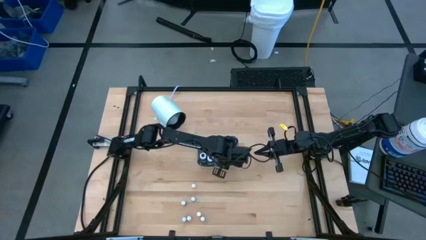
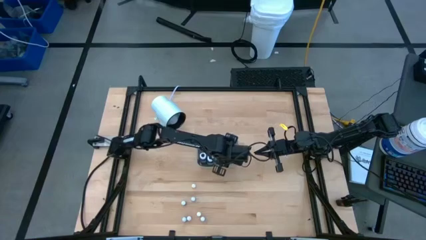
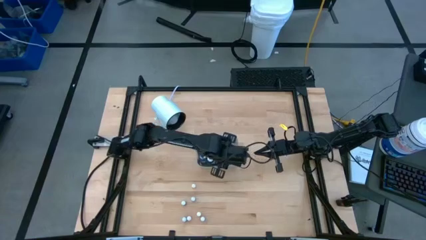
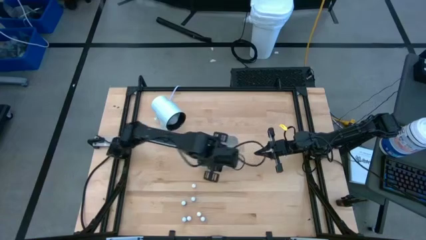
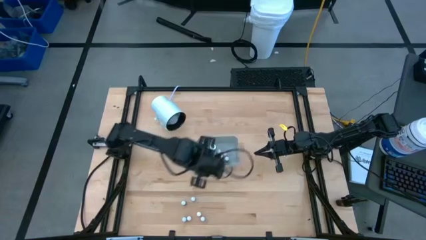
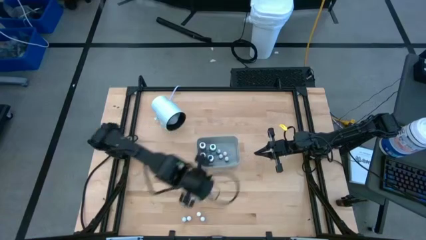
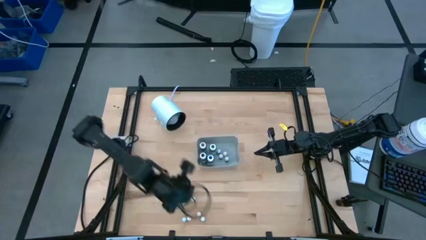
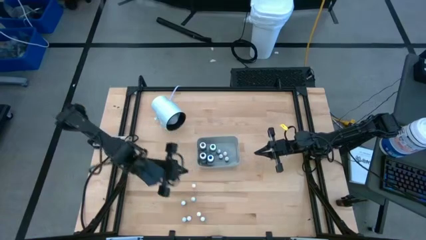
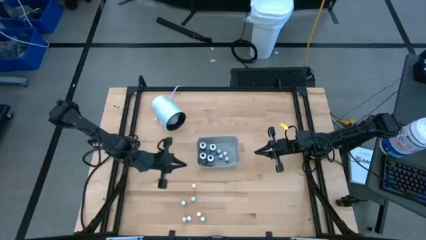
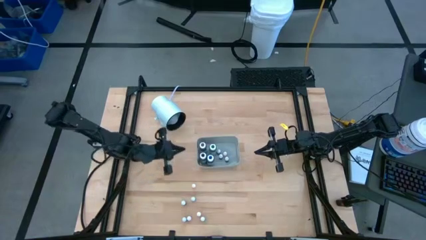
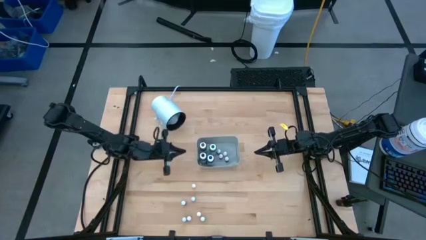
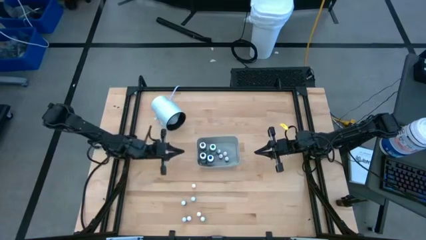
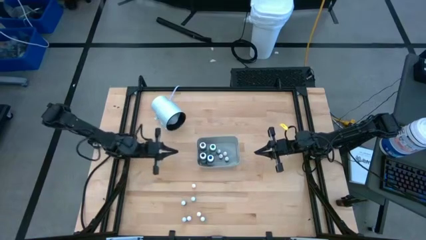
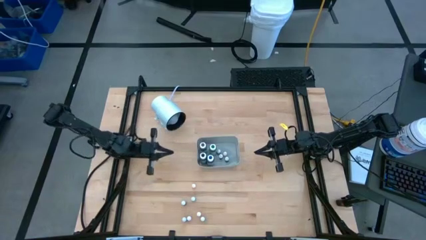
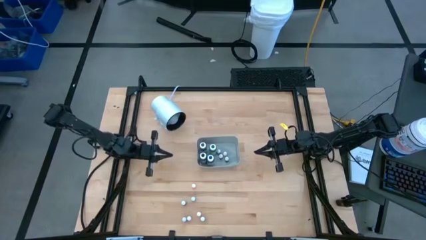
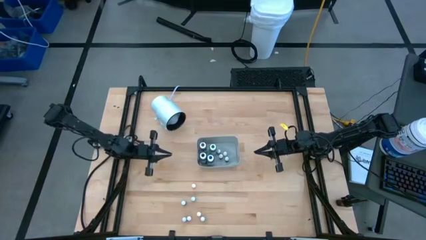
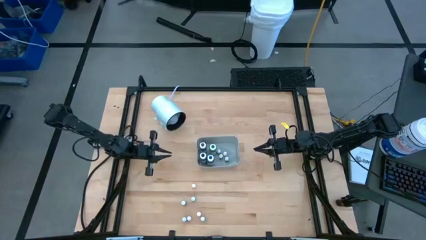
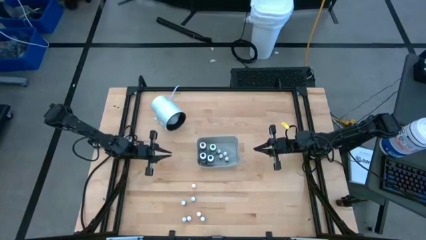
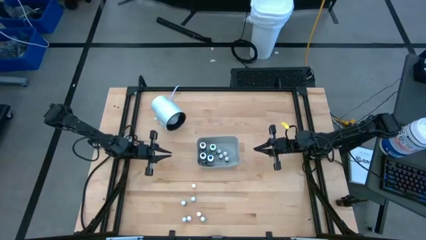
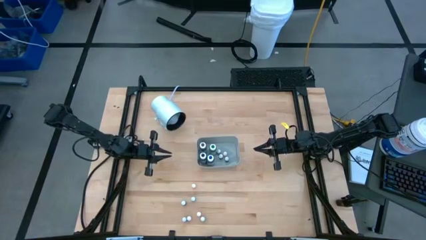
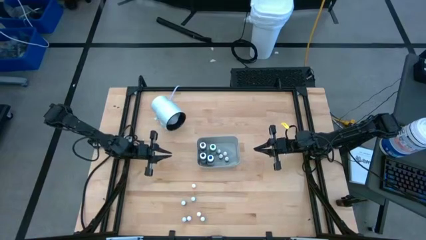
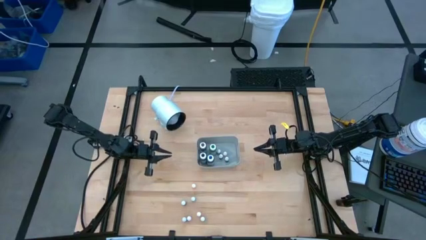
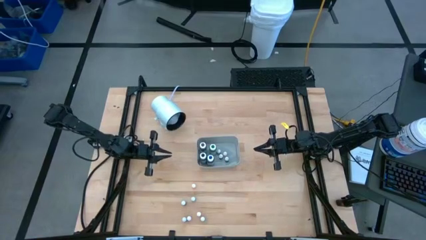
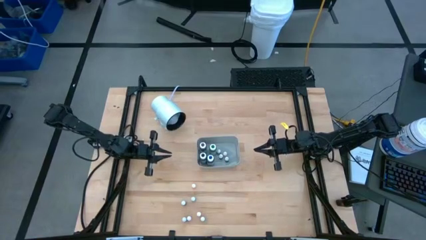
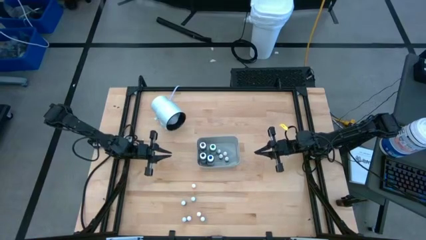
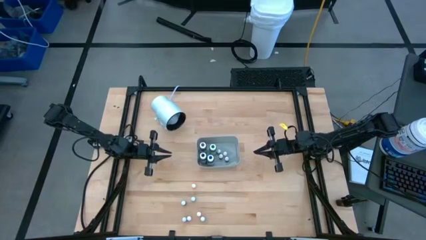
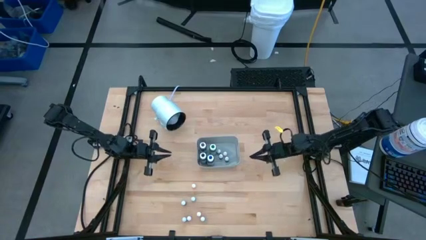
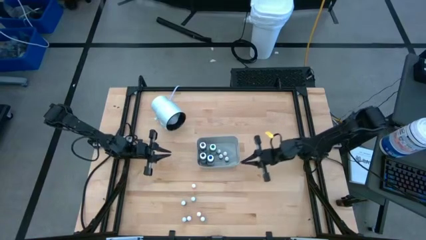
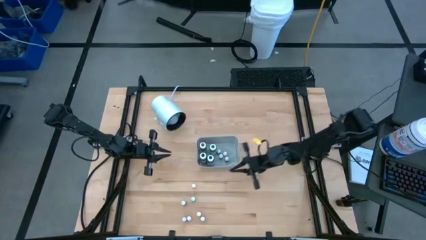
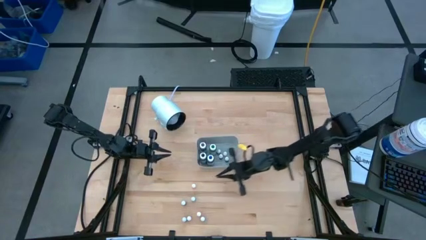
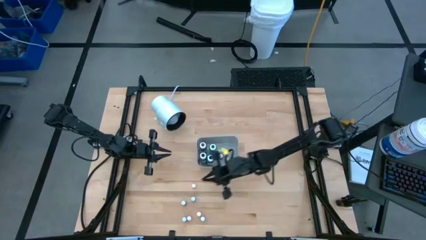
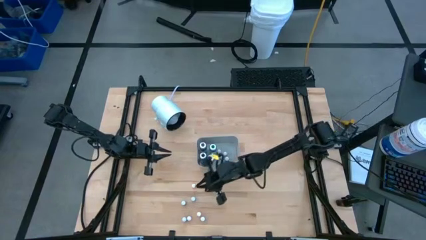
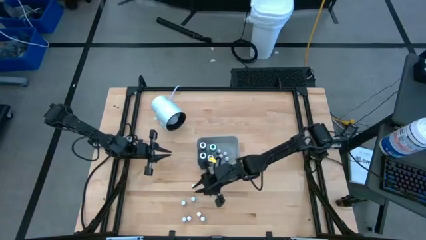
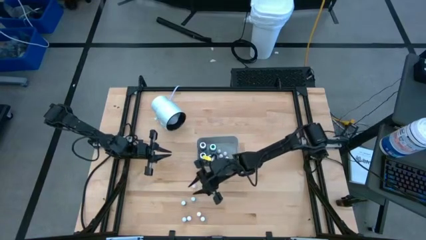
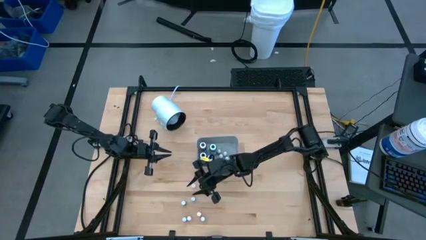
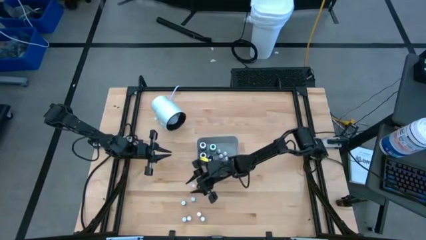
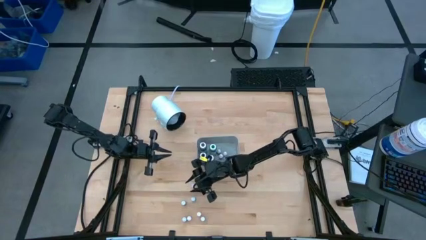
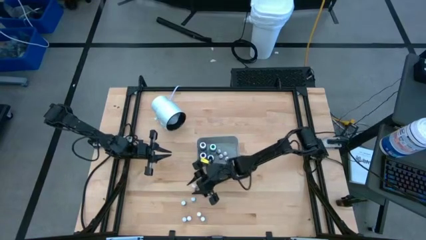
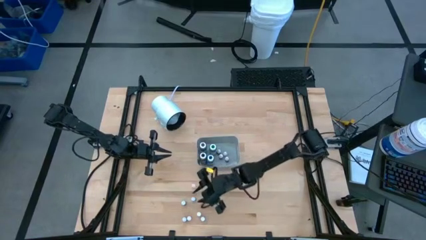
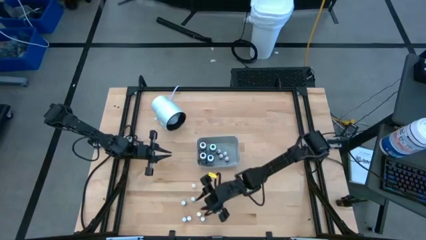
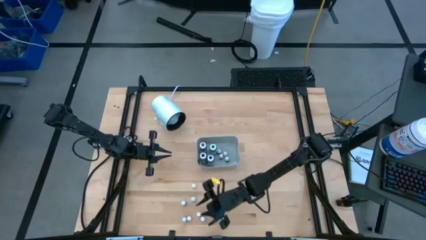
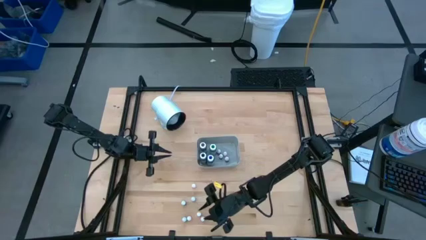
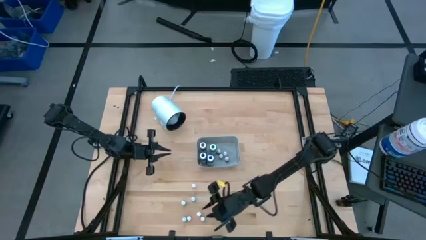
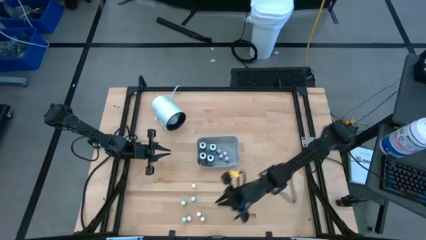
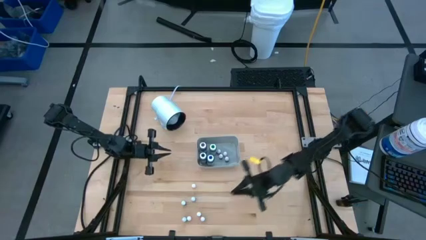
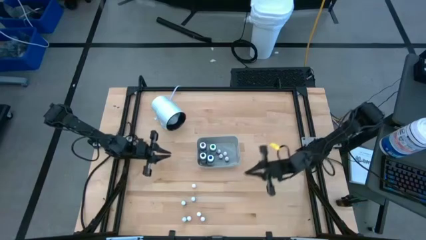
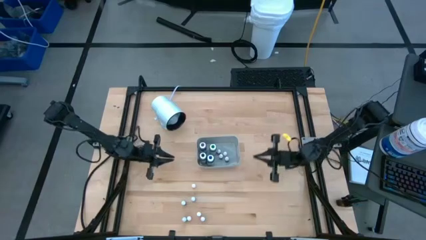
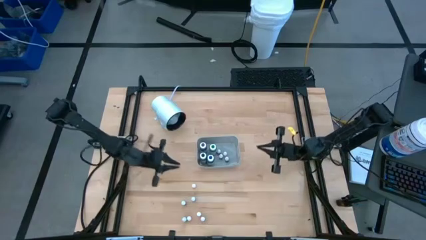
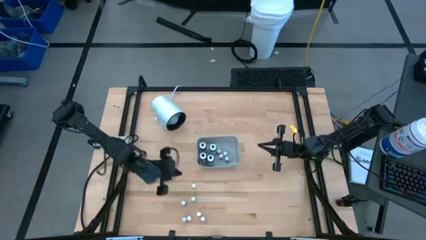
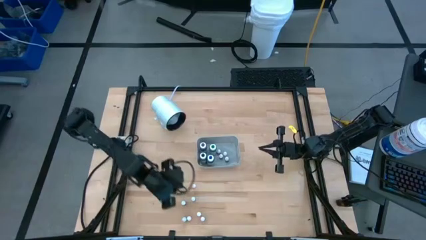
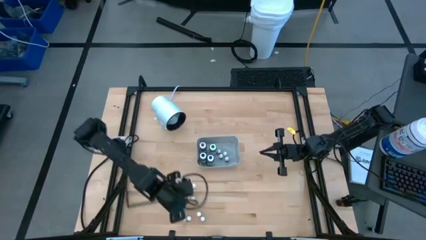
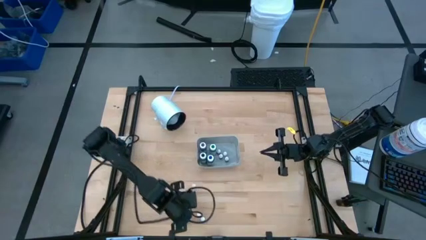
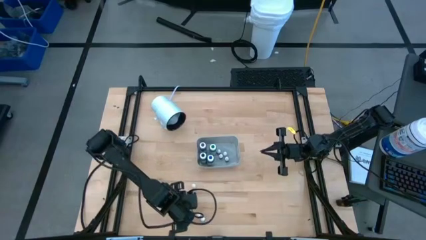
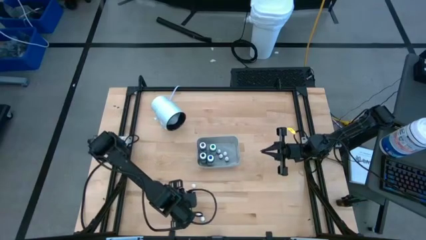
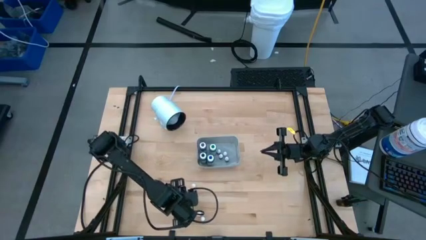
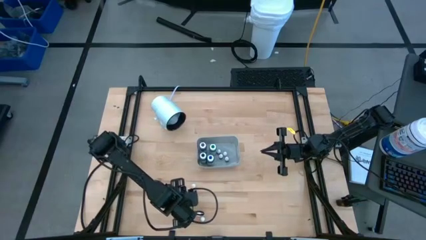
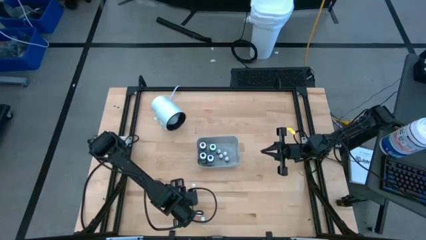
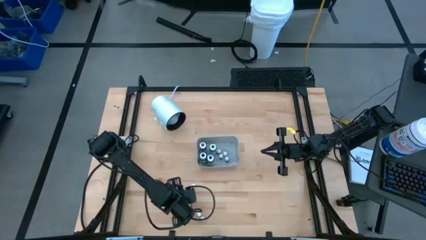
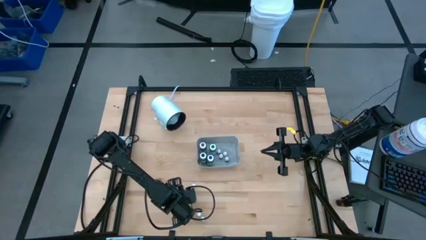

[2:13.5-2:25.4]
Task: Pick & Place food coloring
Put the small black food coloring bottle into the gray bin
